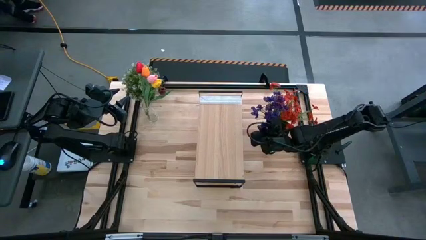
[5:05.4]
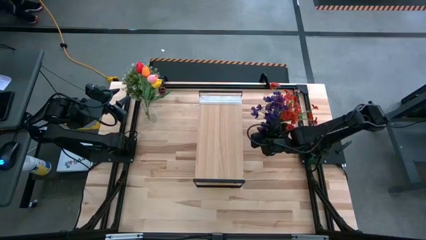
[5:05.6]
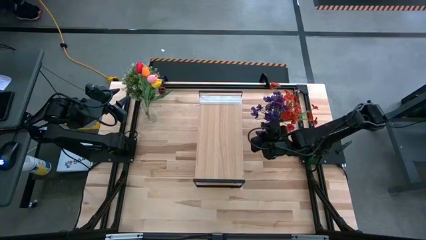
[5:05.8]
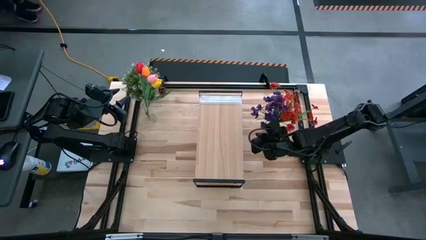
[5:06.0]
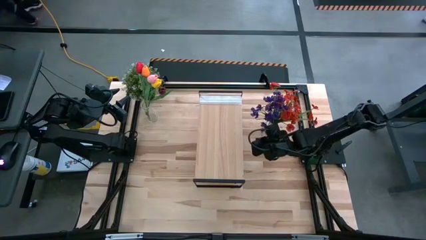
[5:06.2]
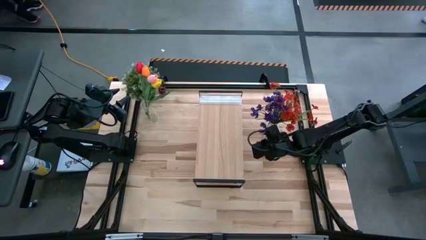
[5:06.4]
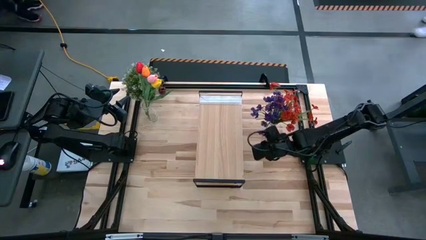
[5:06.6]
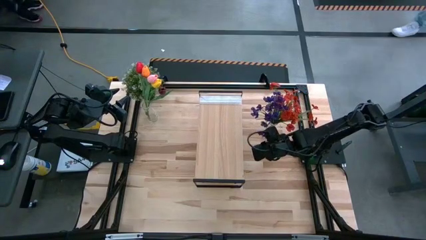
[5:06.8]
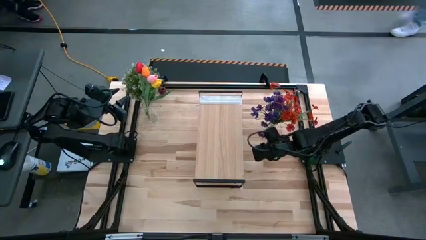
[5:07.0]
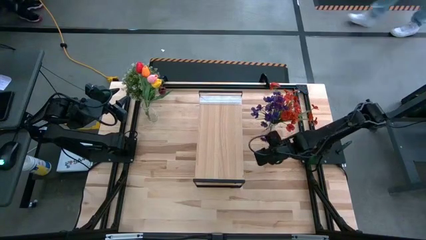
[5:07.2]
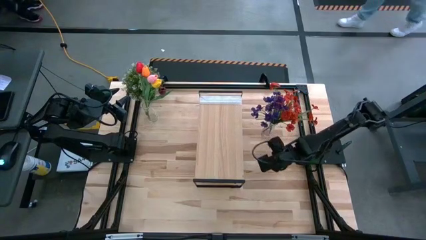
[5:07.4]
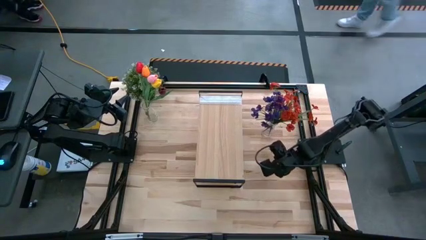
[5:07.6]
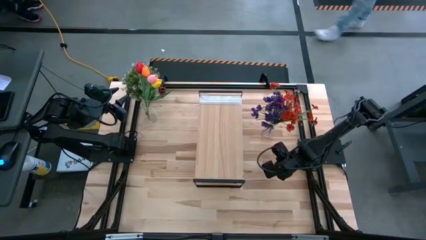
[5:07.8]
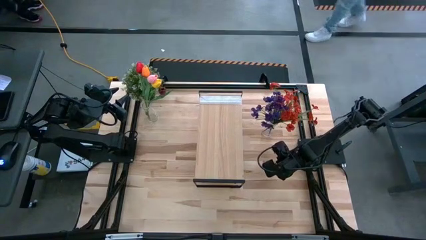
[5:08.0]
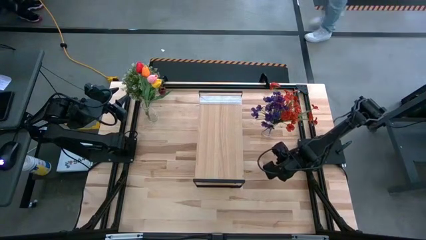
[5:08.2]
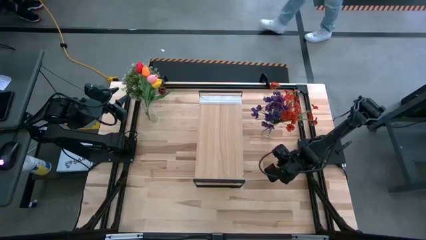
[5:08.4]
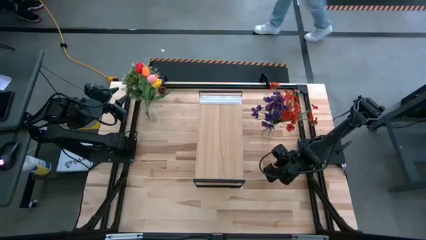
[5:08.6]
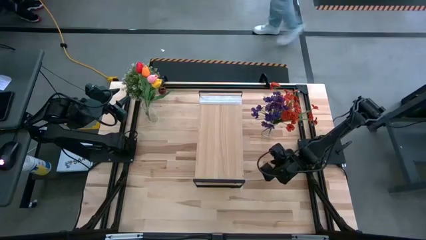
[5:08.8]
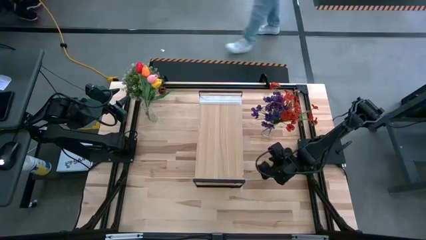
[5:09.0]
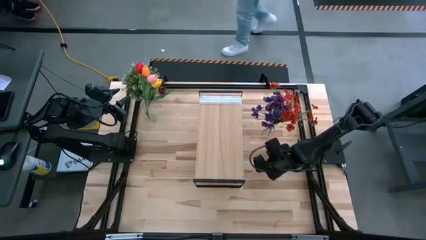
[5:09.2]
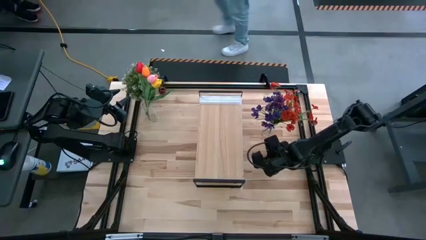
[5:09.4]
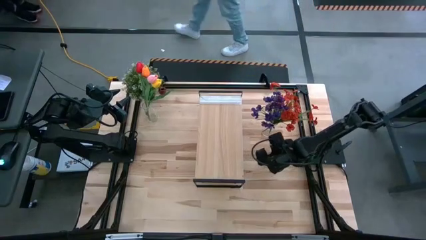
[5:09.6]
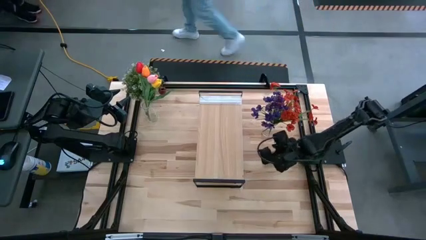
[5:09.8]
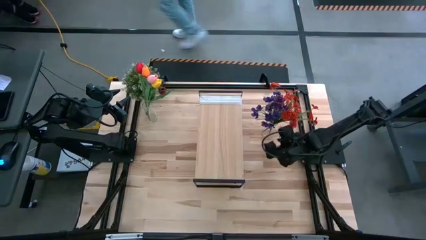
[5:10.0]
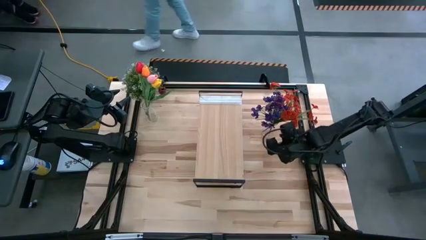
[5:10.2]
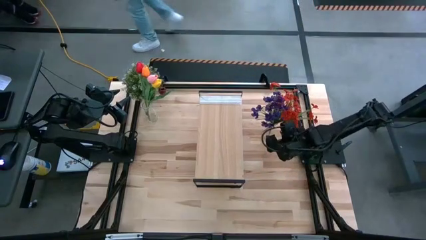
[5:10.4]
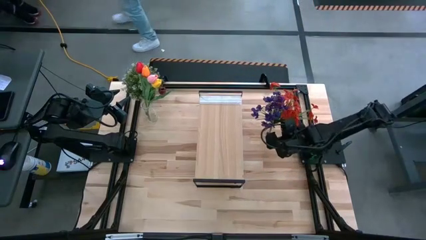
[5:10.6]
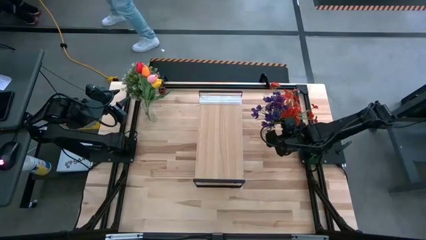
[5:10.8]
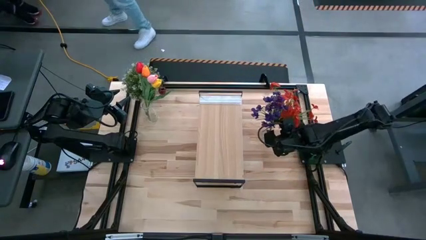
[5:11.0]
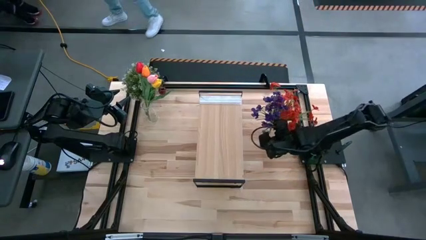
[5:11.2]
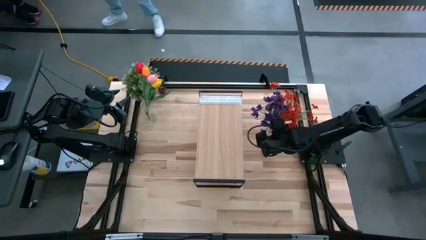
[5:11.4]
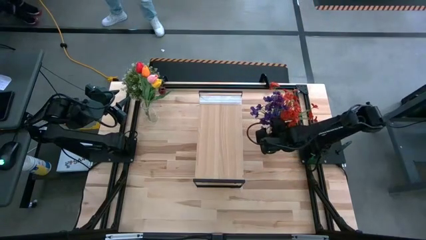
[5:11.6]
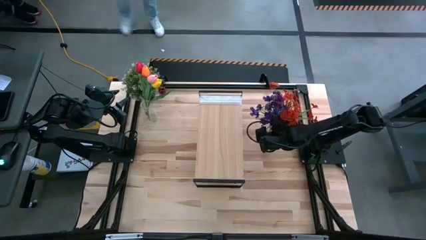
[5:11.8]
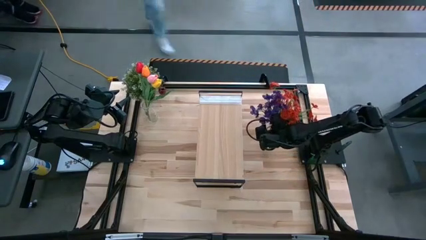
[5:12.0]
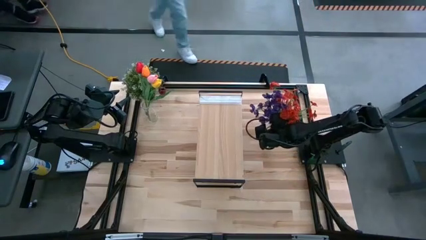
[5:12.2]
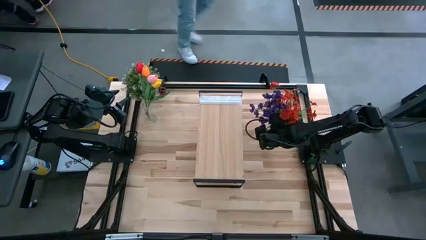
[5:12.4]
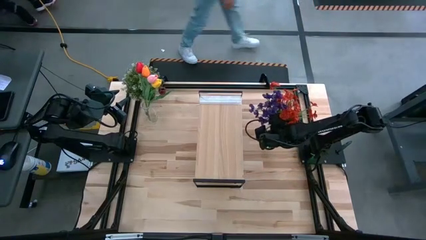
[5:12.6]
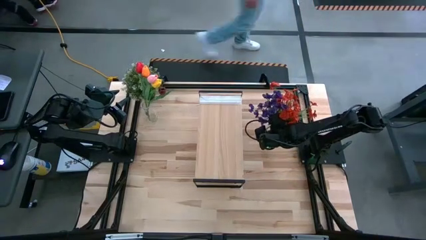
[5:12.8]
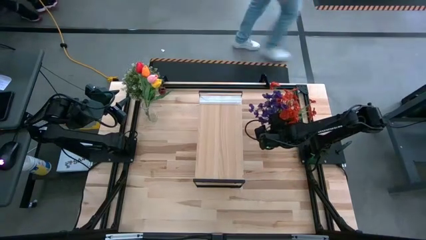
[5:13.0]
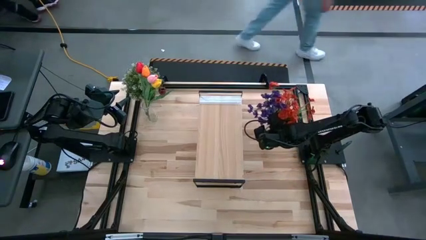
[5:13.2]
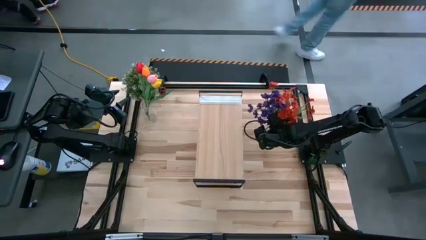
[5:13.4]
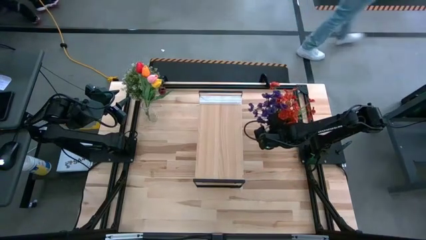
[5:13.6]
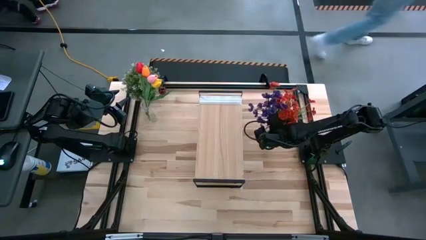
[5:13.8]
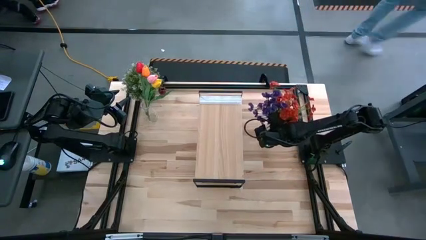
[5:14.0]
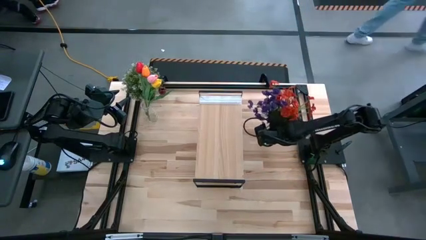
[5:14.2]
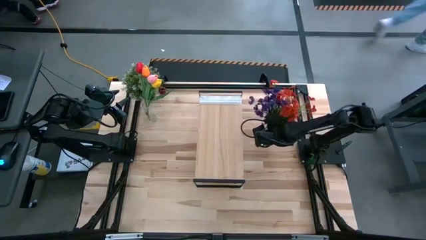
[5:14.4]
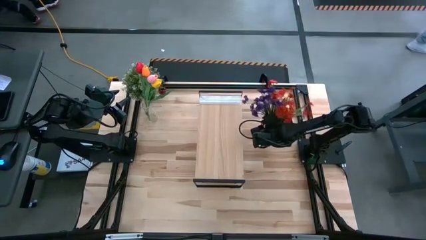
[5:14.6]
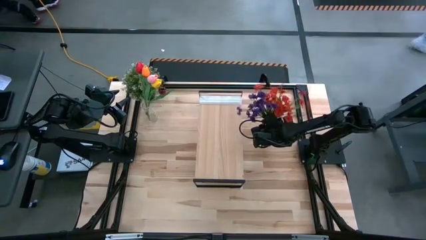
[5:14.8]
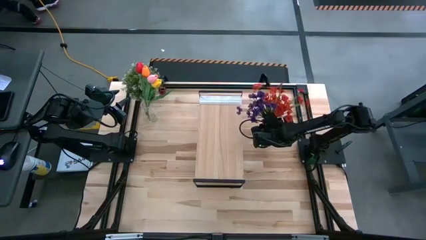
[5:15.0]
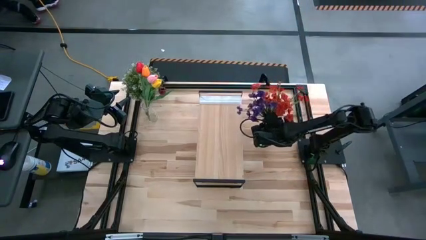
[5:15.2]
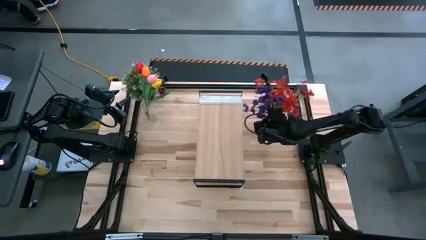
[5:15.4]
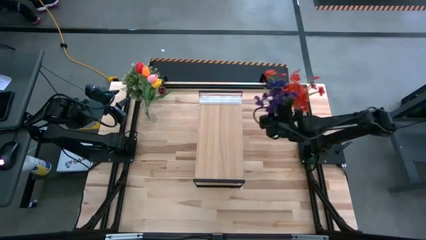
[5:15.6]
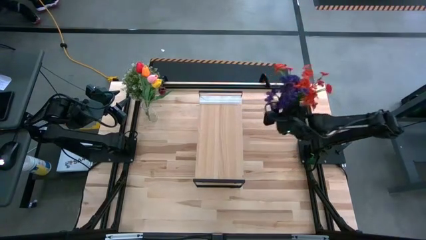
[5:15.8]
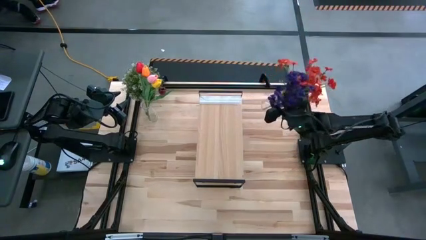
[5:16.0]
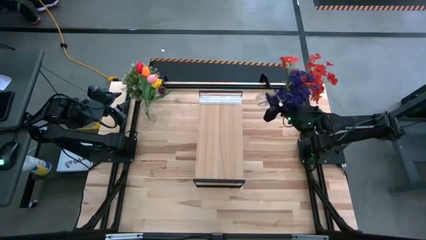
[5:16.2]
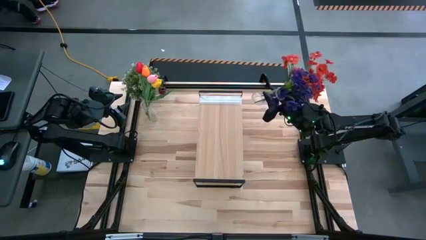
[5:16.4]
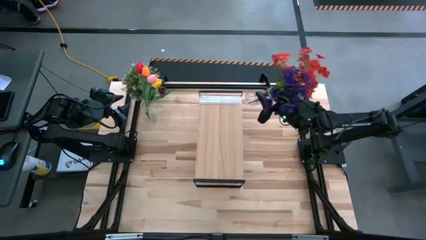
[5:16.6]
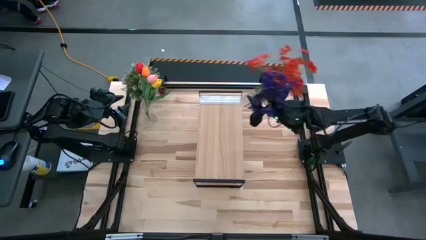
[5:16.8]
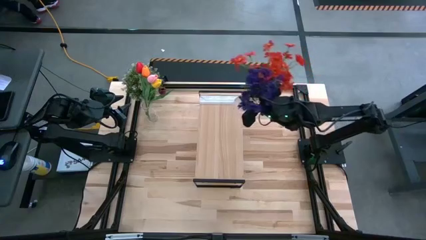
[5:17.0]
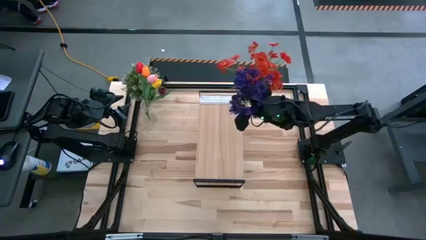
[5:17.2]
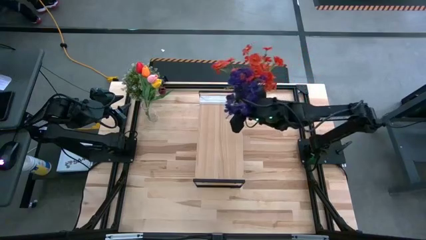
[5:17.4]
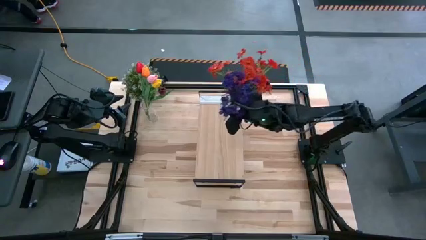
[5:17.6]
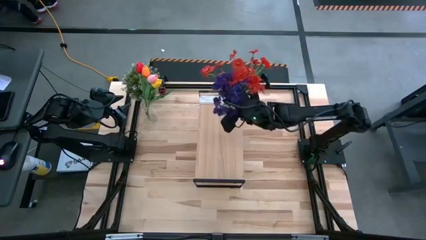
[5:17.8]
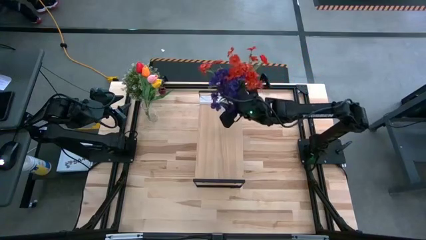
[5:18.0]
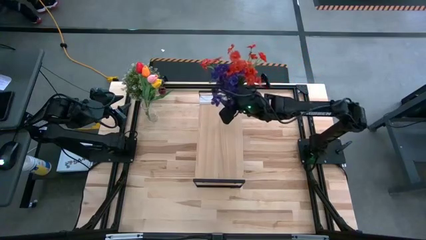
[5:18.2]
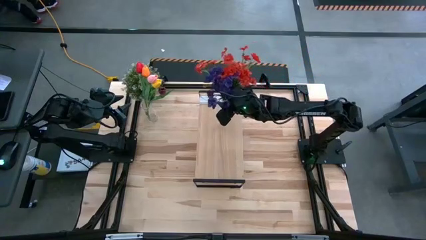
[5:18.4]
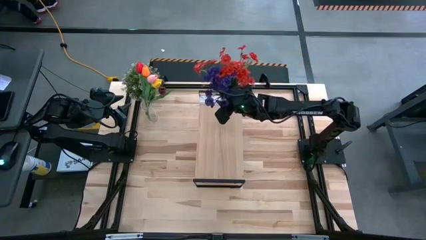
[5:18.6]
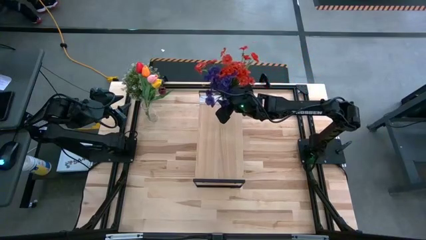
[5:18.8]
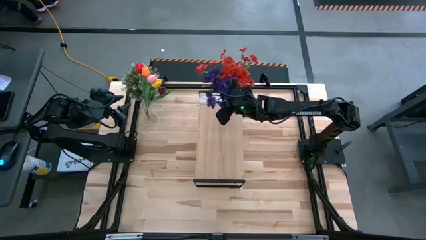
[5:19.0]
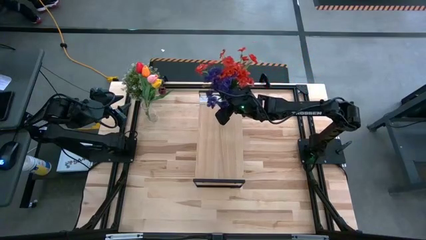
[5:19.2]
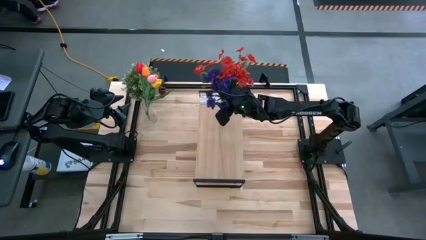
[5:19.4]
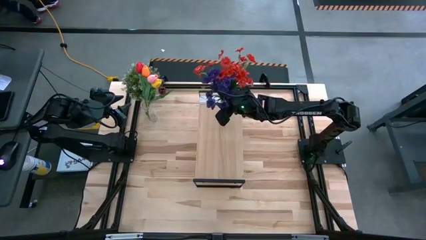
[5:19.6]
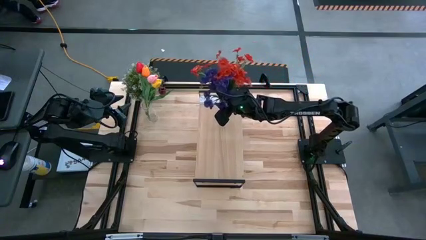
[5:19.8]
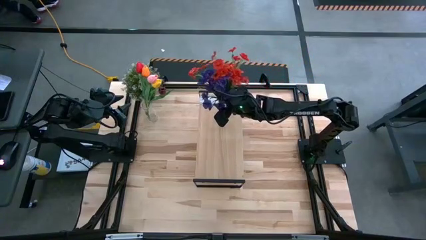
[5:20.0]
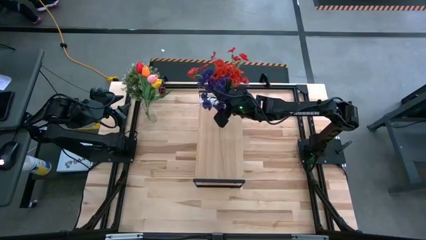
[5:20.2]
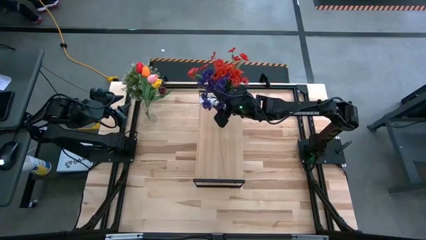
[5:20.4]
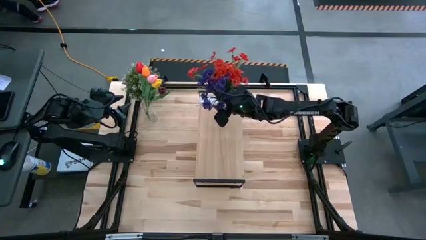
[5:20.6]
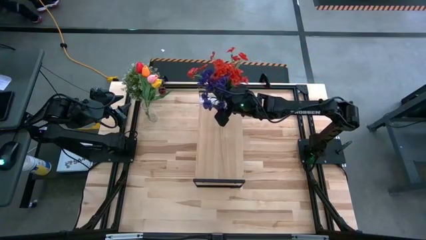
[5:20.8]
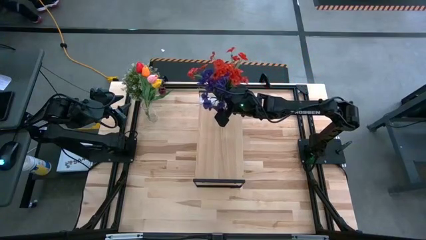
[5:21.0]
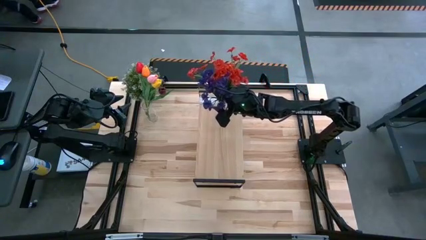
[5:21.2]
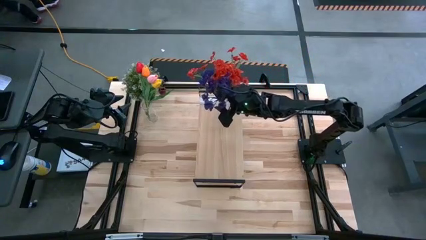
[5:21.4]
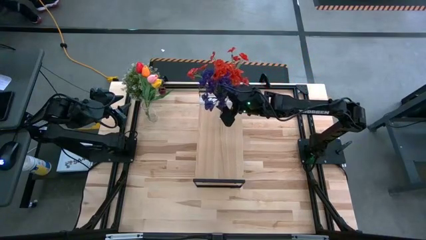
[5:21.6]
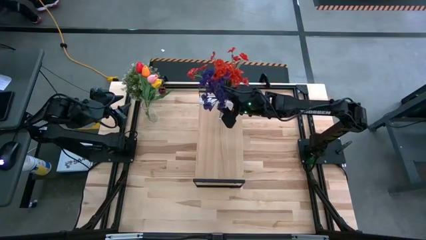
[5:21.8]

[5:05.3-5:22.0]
Task: Pick and place flowers into a vace then onto a shelf
Put the right transparent flower vase on the shelf
